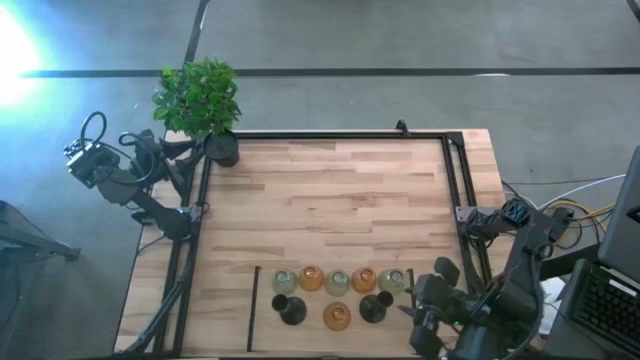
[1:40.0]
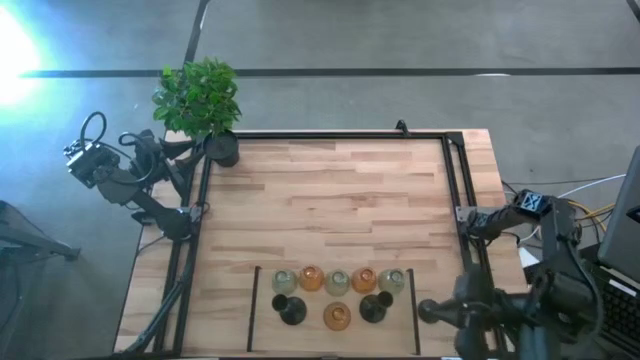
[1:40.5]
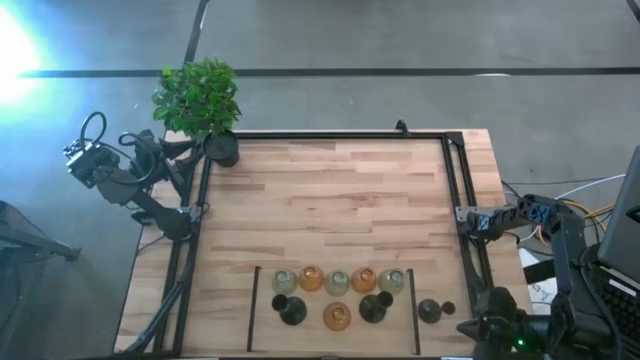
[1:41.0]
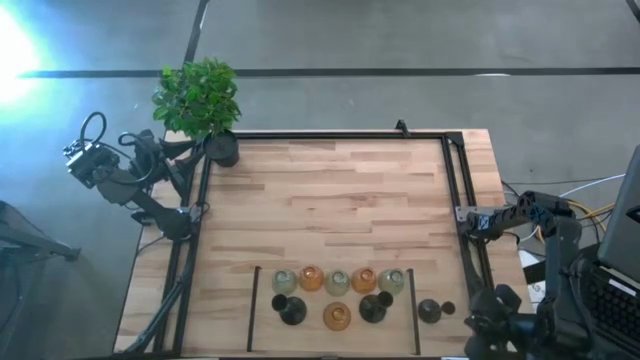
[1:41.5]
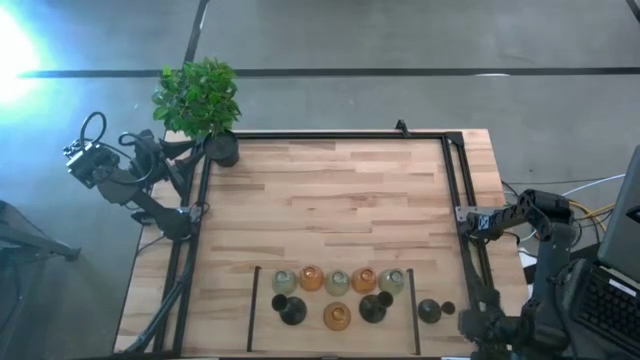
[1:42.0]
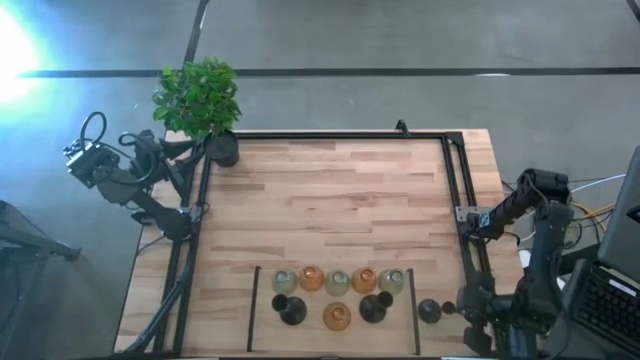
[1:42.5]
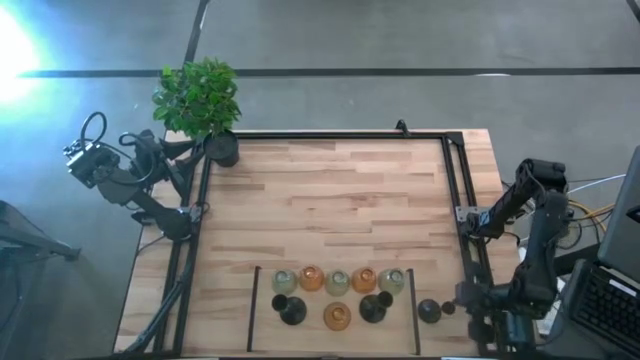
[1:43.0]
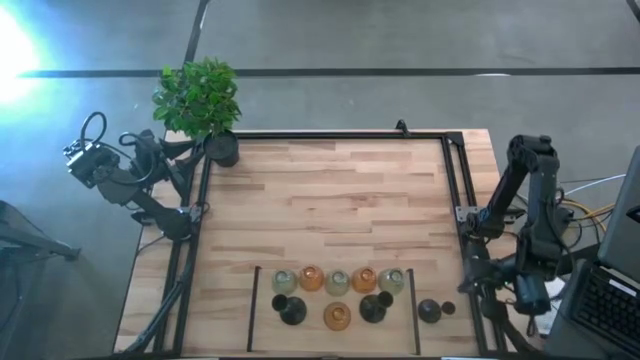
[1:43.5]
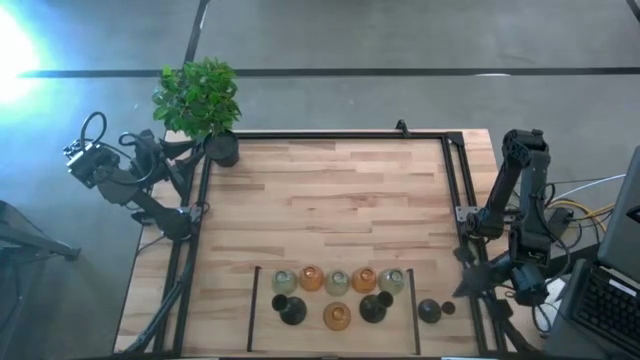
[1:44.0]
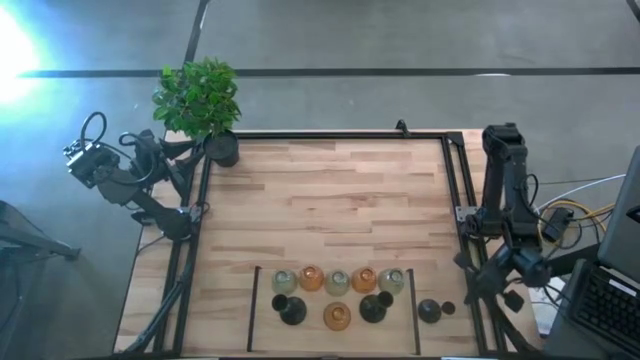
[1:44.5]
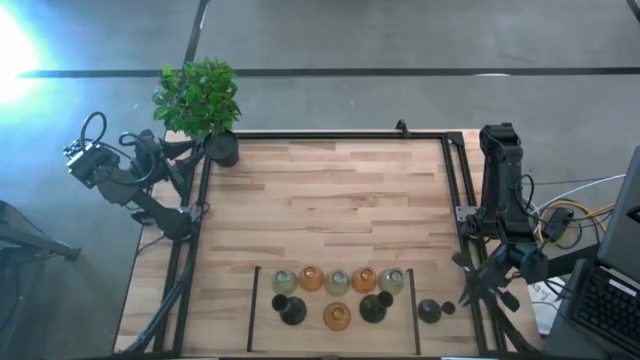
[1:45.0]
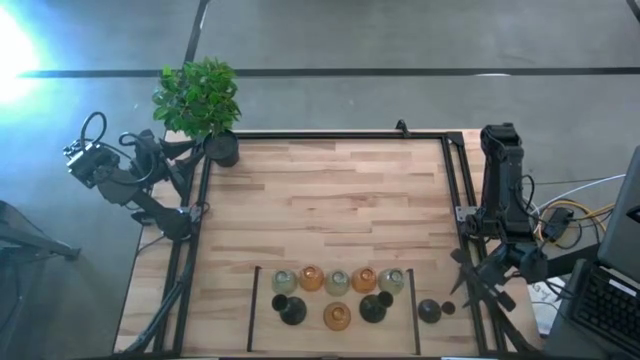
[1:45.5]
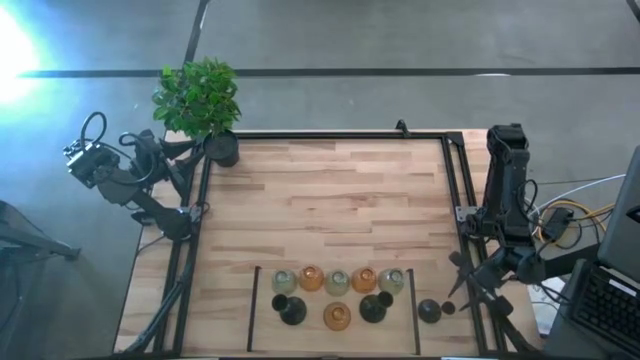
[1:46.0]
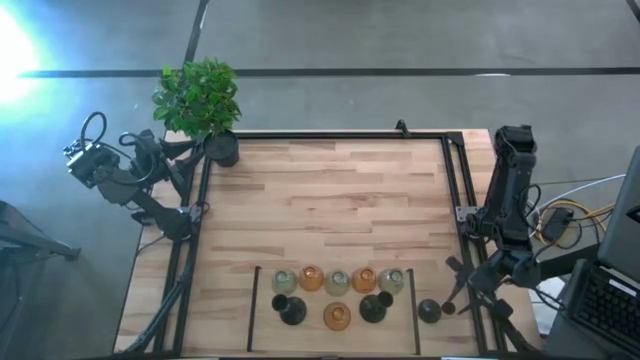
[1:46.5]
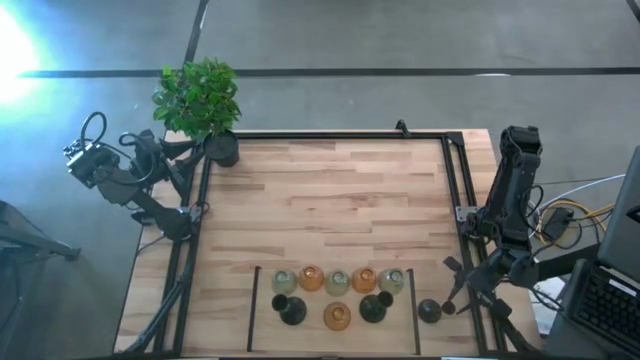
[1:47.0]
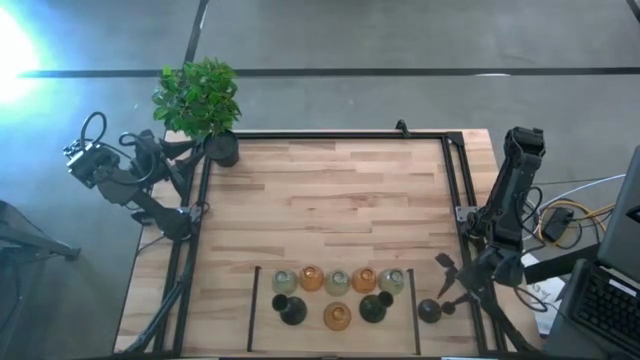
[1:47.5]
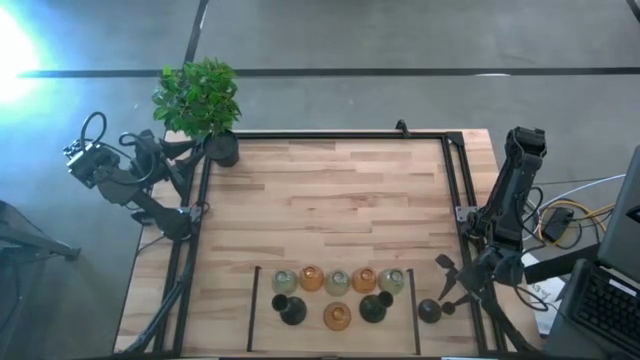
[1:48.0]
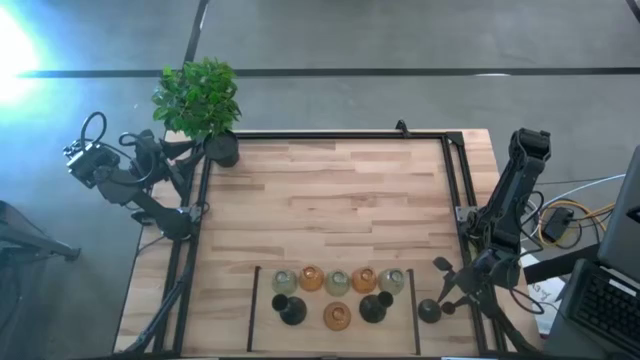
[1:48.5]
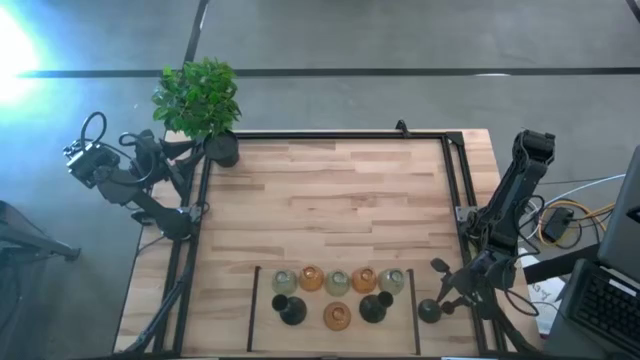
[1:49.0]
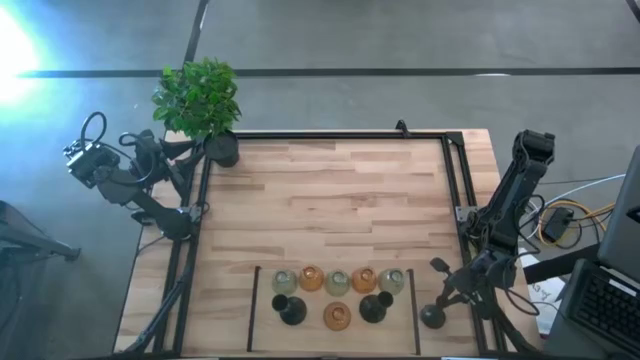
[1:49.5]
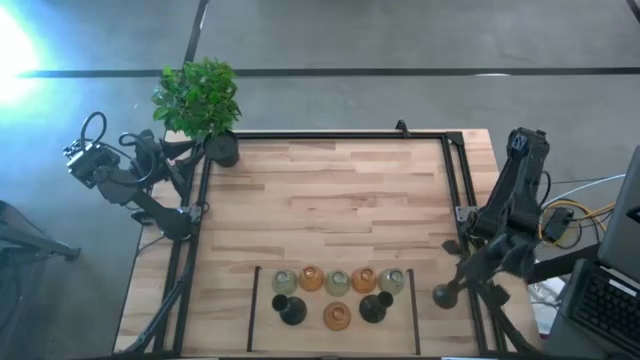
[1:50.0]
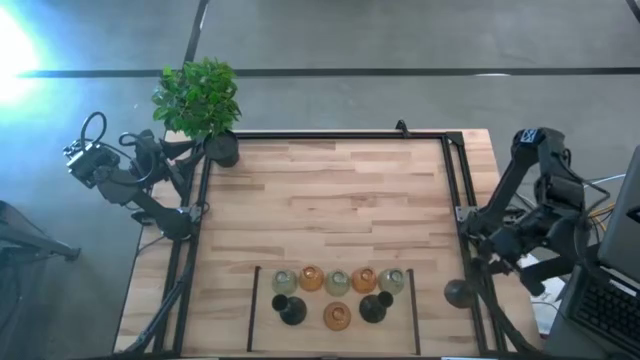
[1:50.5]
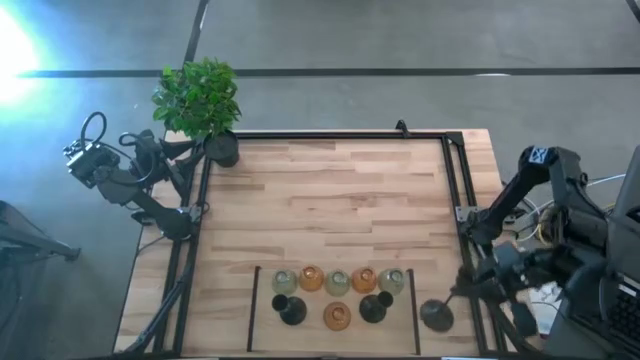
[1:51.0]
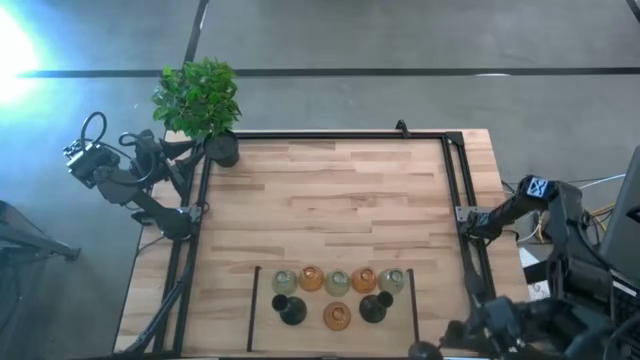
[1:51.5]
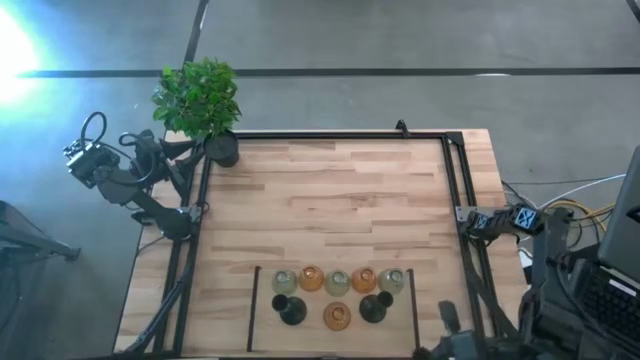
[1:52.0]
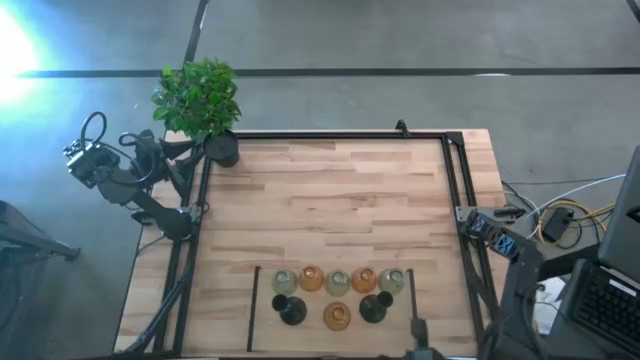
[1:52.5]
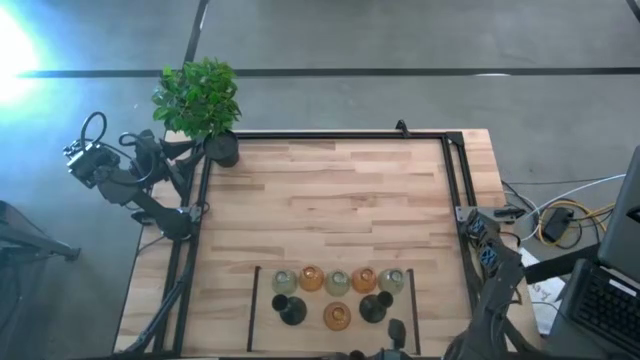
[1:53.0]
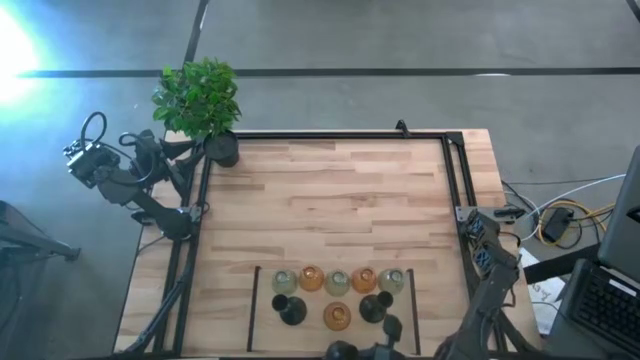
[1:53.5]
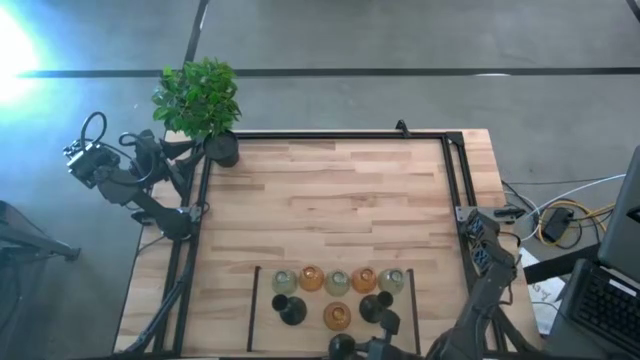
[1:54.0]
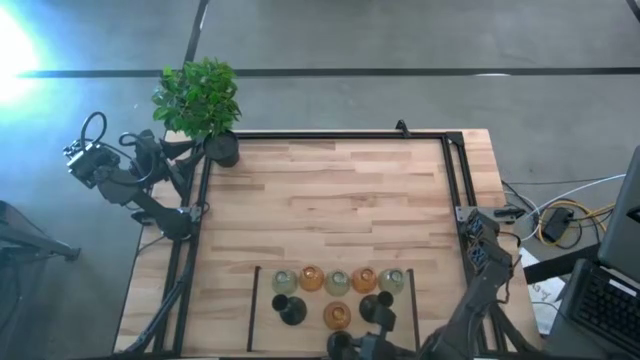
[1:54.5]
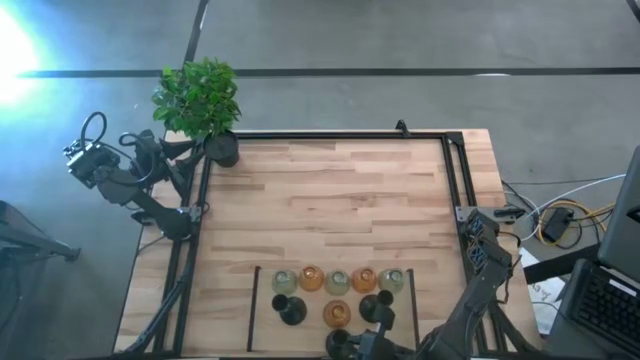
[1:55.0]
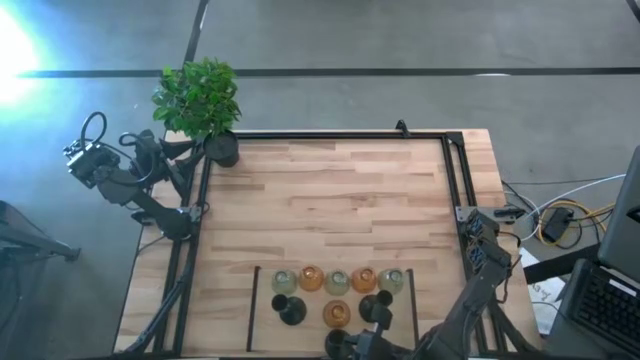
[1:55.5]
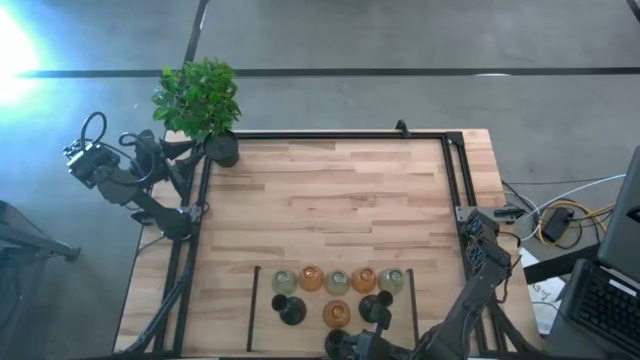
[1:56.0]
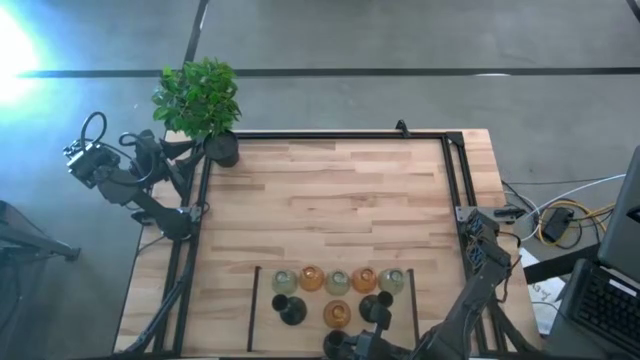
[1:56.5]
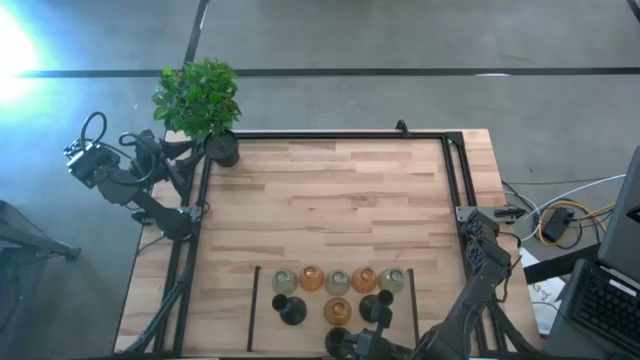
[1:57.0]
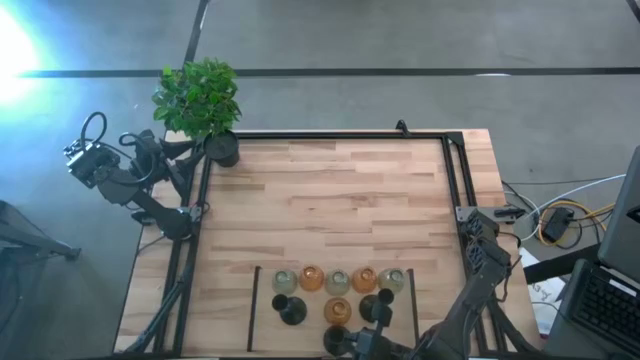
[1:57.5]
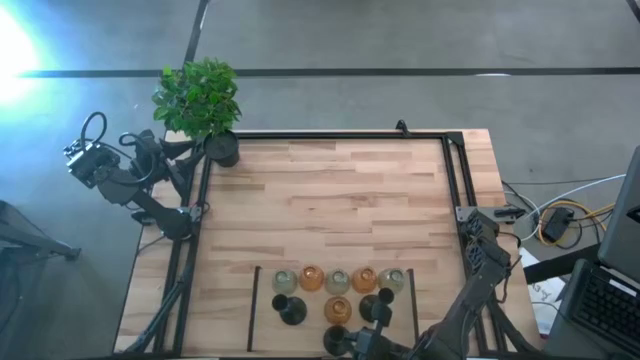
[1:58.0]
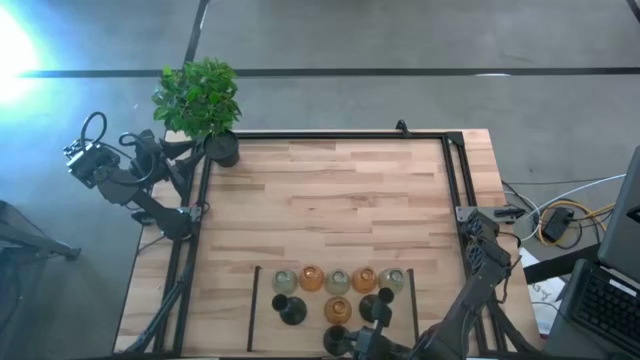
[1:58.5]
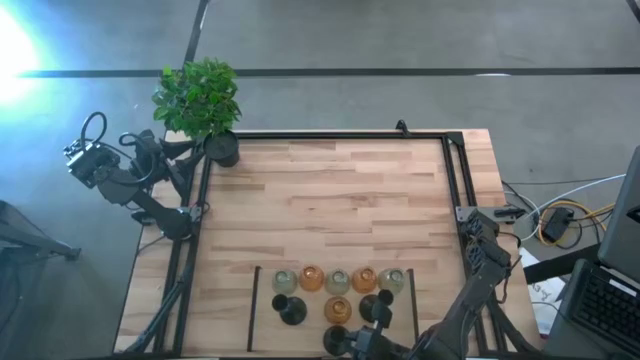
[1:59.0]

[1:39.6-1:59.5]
Task: Pick & Place candle stick holders
Put the black candle holder on the shelf

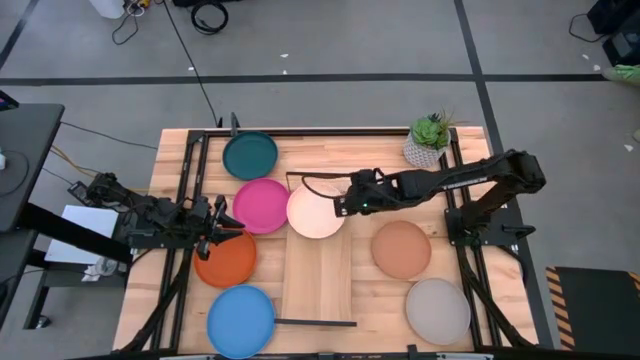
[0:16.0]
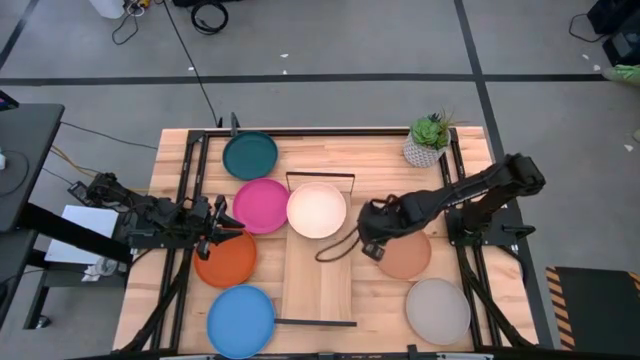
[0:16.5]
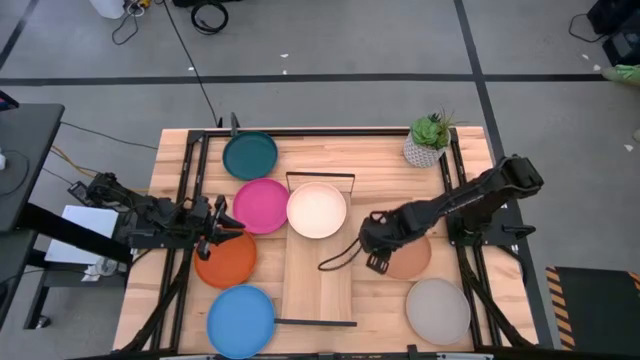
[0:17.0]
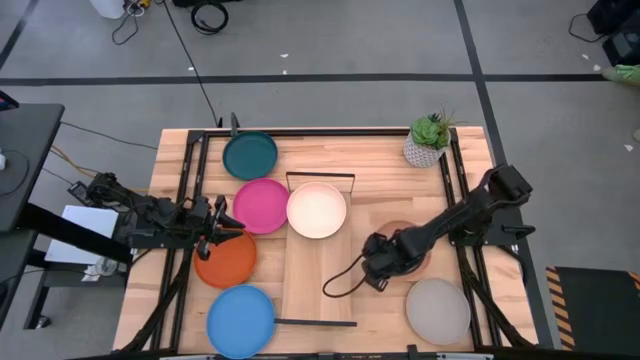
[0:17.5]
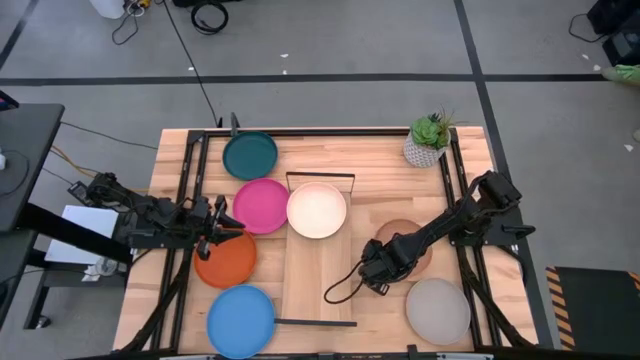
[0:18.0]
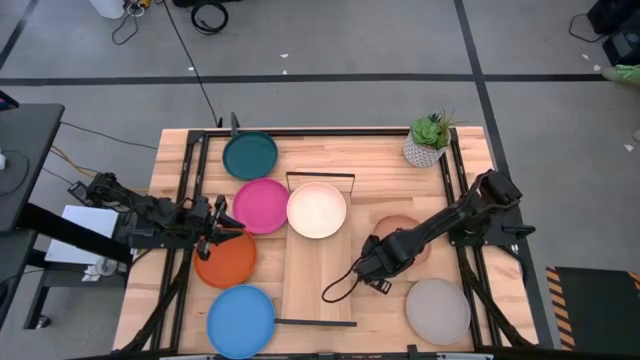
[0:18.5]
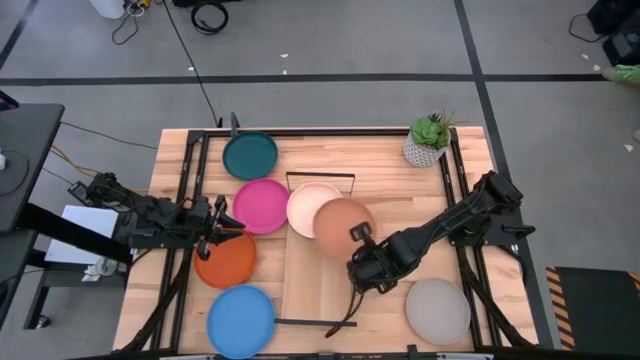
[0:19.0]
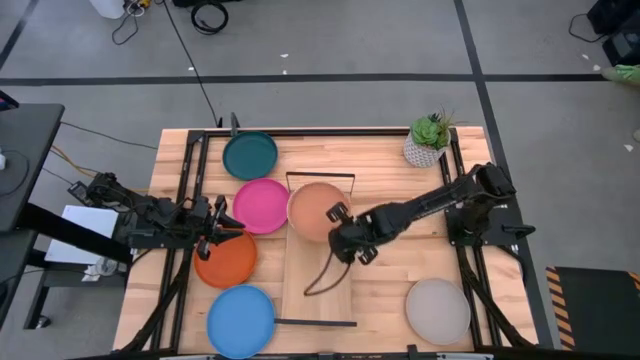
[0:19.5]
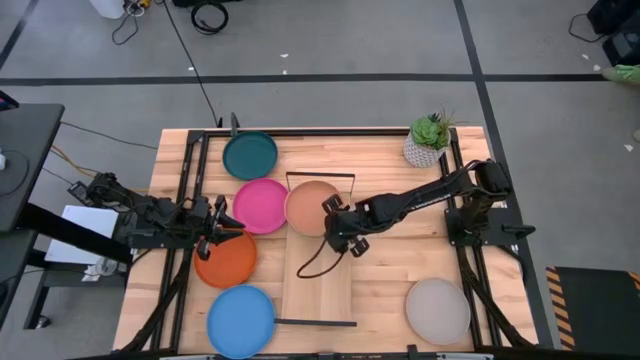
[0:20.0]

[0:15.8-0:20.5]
Task: Place and stack plates onto a shelf
Stack the light brown plate on top of the peach plate on the shelf
